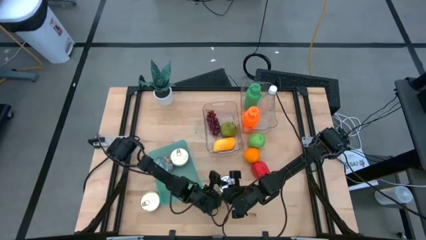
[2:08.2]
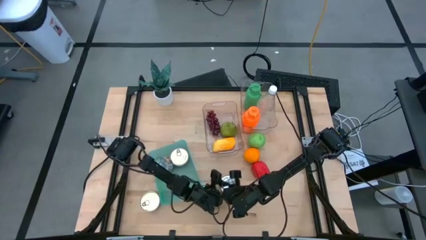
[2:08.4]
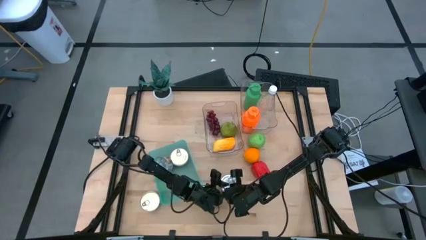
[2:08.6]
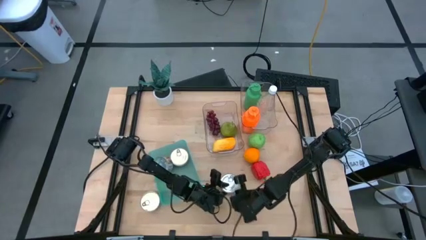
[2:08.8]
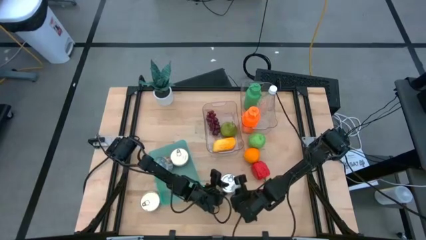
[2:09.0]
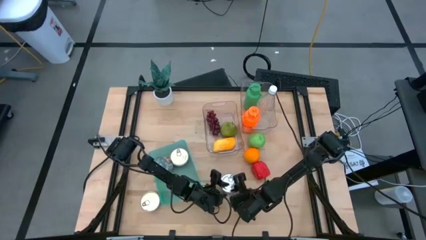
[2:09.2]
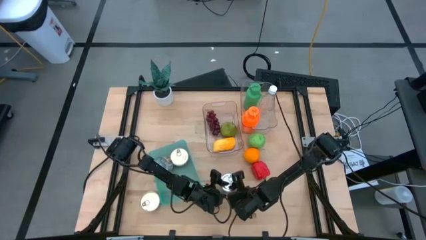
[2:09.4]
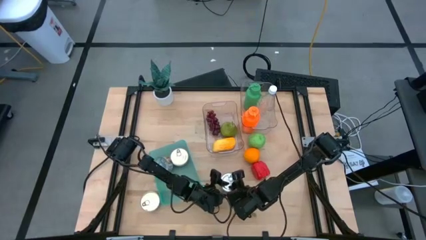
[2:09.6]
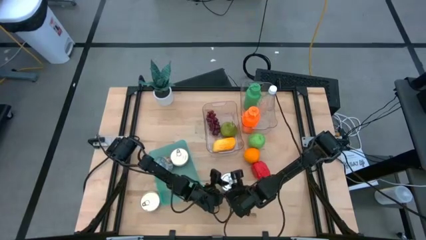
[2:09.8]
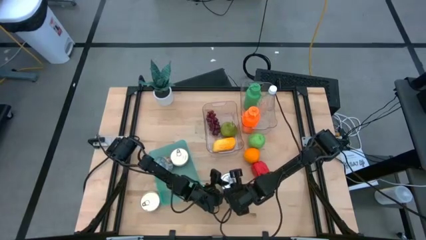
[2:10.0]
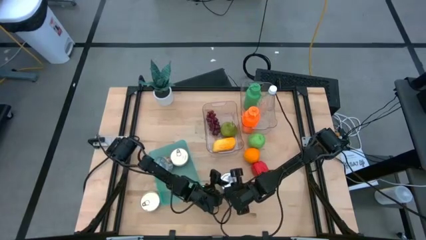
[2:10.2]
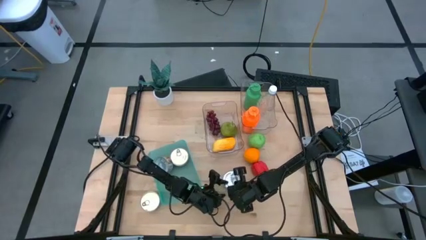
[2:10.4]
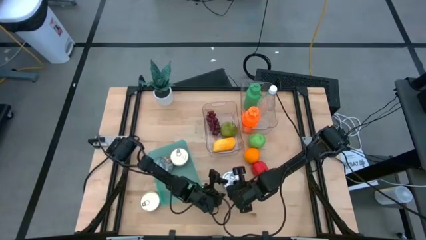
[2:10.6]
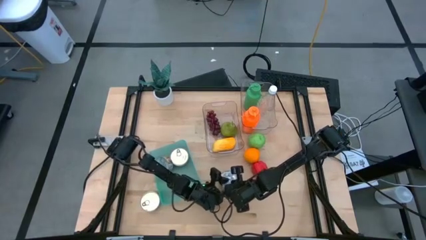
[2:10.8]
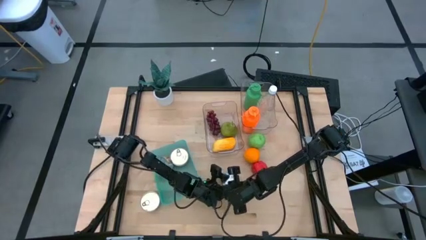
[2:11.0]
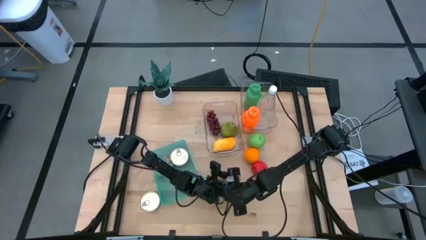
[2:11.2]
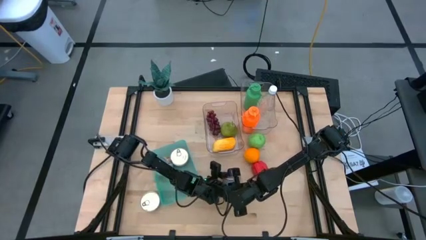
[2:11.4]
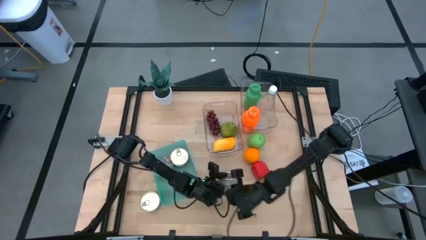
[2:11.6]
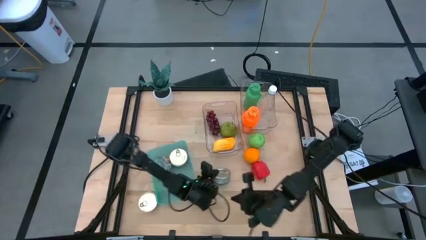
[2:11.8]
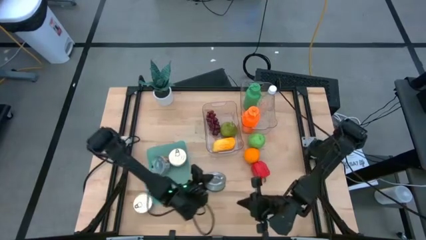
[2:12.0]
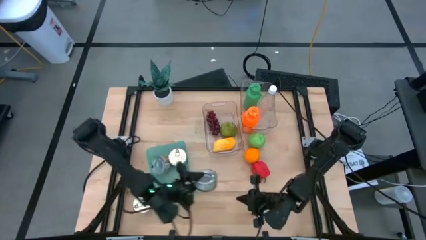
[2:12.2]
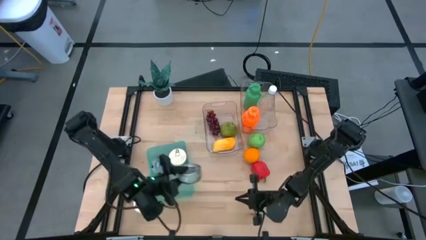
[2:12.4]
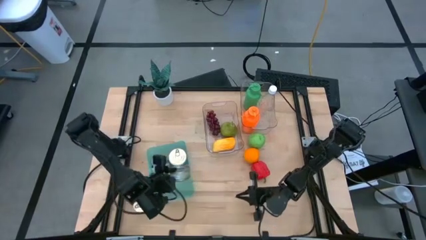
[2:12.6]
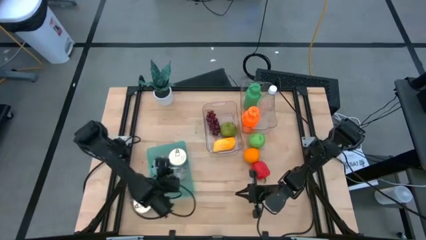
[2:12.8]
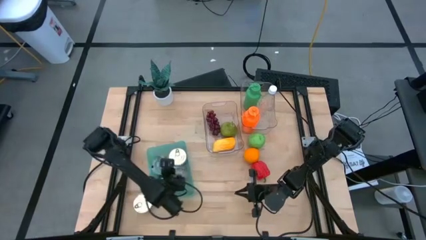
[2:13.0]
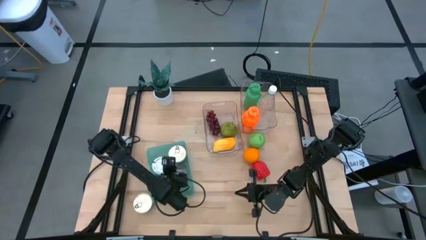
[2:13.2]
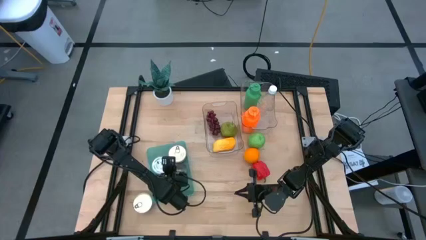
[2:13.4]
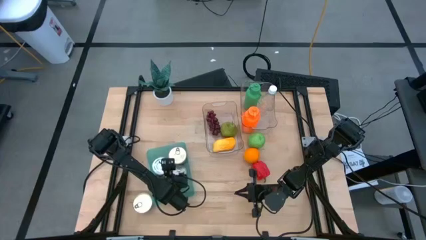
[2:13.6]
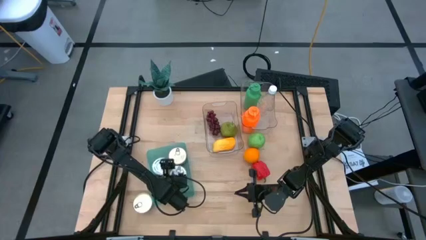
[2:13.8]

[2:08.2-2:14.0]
Task: Pick & Place Food Item
Put the green tuna can into the green bin

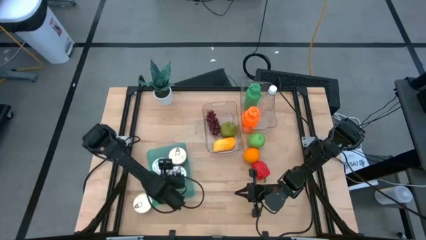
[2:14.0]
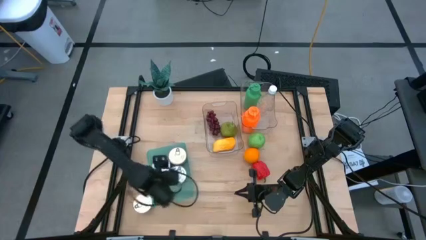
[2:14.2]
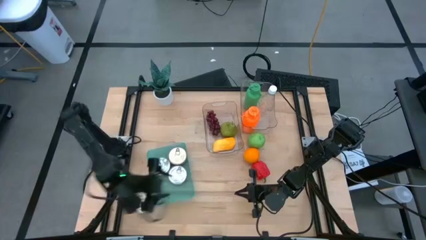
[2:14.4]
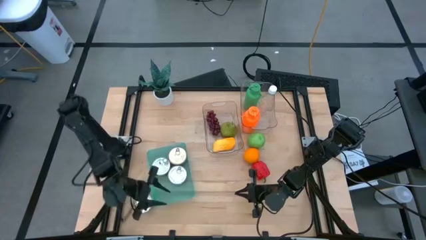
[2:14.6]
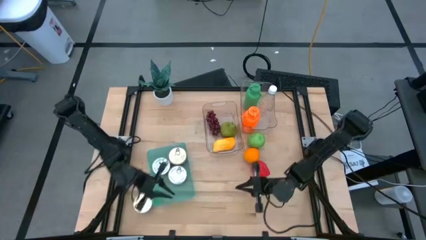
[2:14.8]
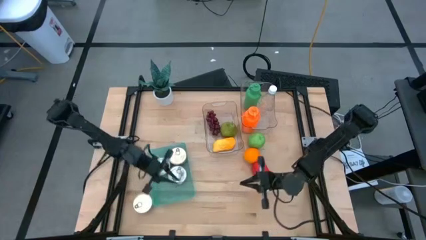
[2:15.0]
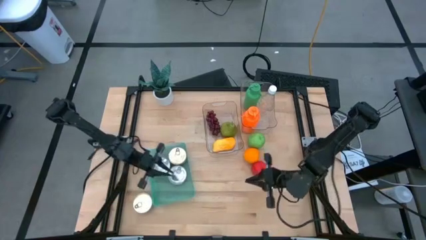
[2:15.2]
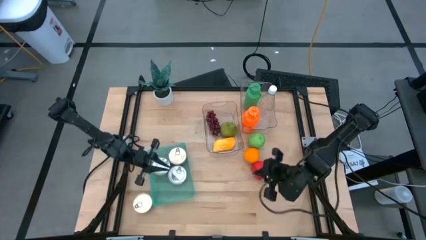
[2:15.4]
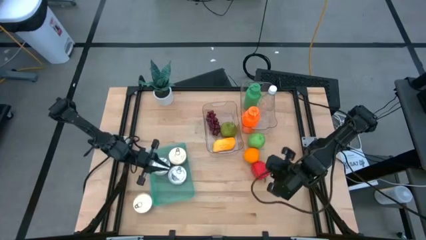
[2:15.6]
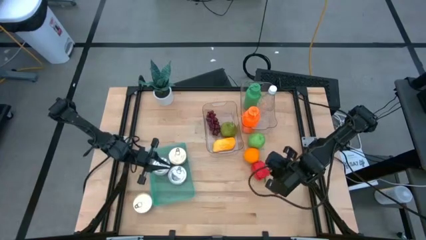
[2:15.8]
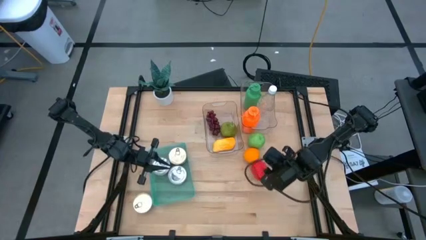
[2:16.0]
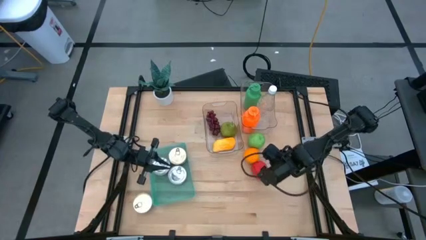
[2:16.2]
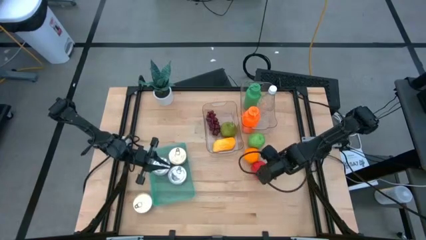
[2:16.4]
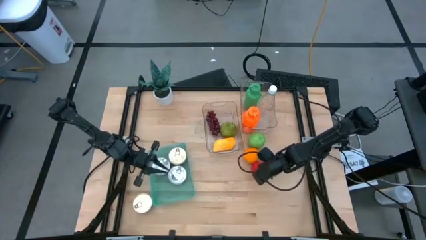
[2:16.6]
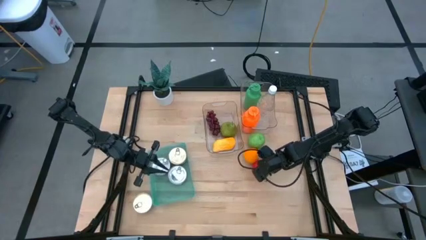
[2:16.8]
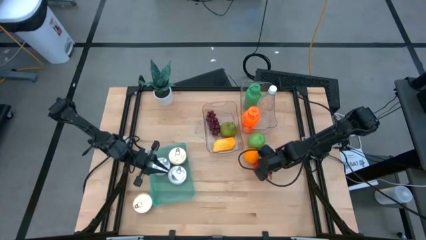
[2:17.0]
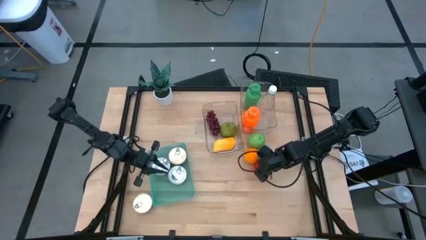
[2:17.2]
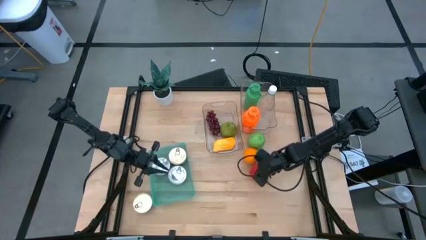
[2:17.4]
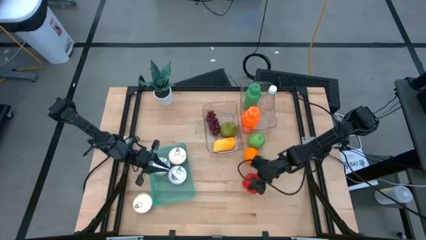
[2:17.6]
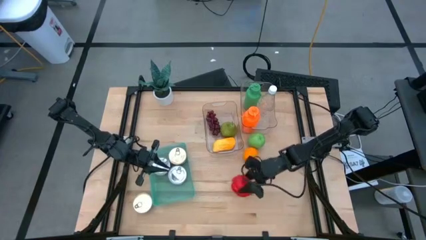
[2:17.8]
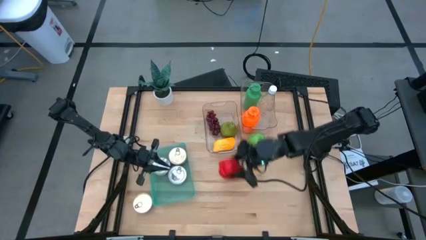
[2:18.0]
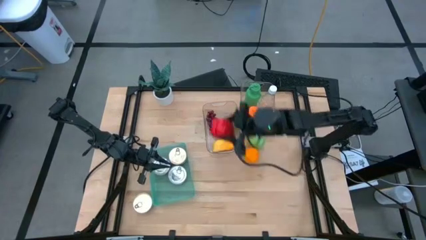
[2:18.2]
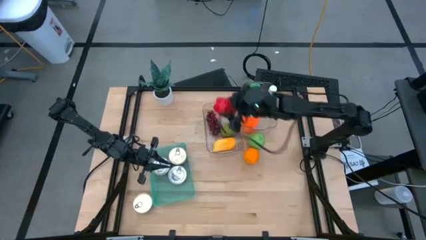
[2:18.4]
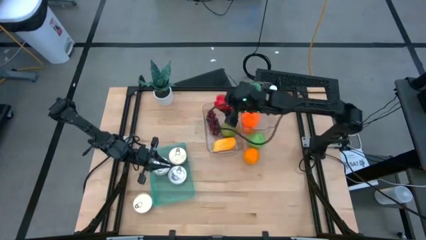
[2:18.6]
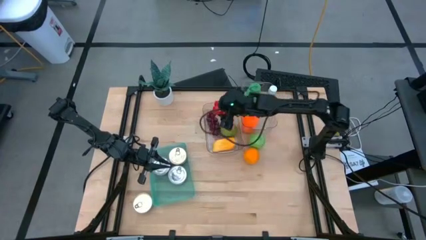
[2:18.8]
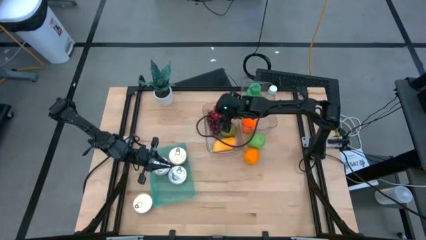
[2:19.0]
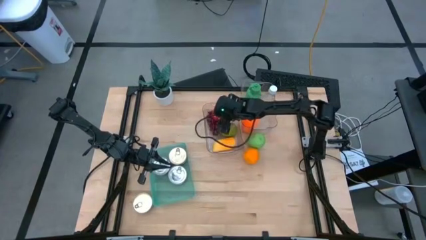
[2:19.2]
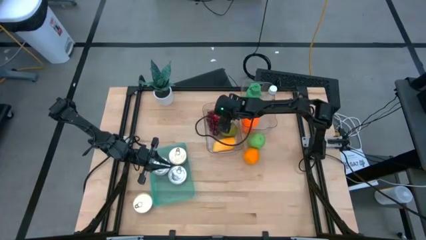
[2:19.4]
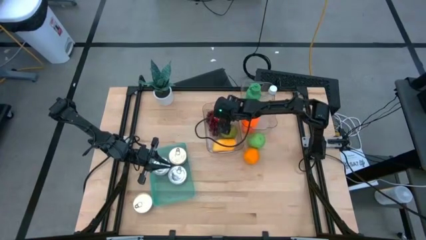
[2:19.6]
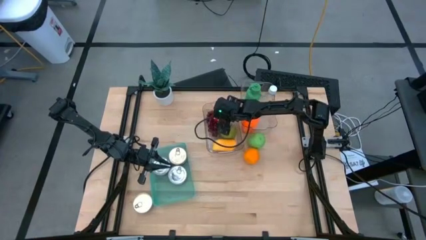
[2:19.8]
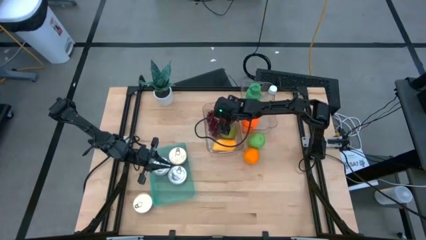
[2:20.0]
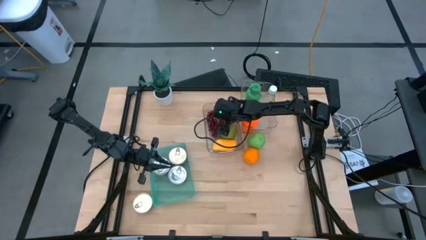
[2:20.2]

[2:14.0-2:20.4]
Put the red bell pepper into the bottom transparent bin

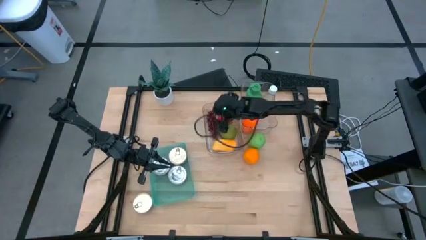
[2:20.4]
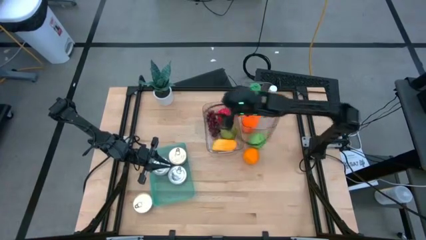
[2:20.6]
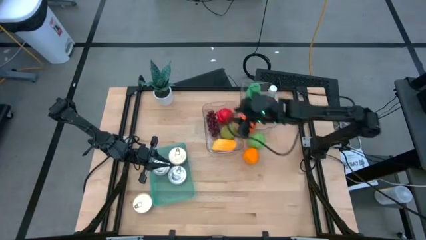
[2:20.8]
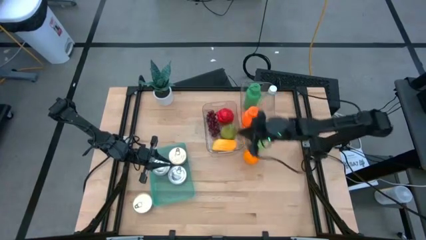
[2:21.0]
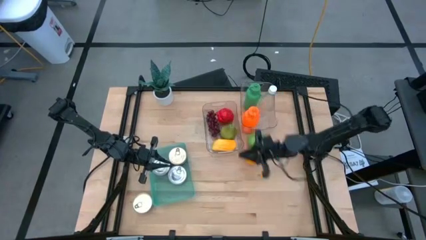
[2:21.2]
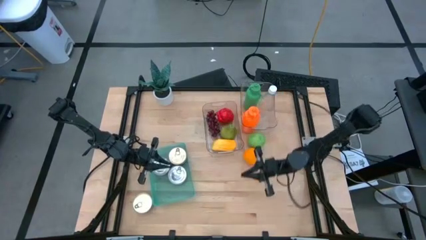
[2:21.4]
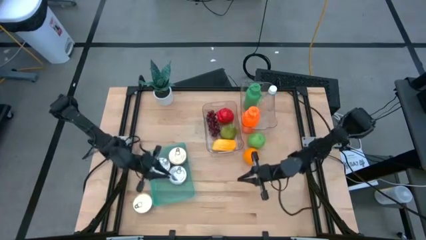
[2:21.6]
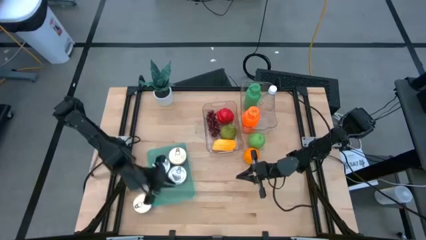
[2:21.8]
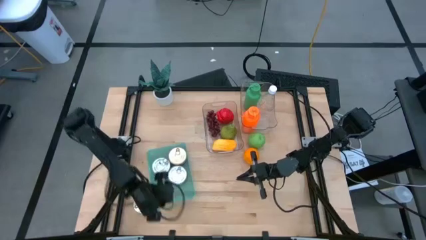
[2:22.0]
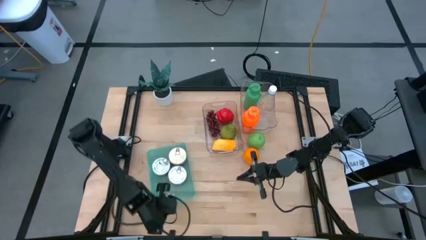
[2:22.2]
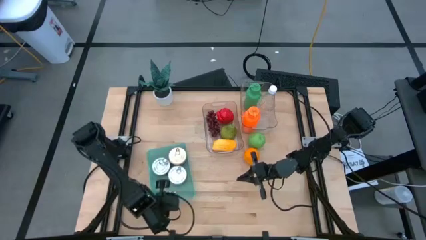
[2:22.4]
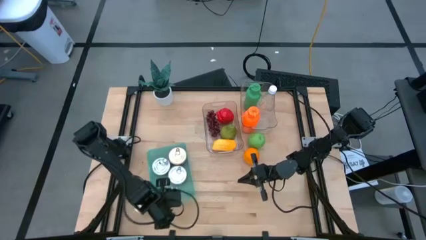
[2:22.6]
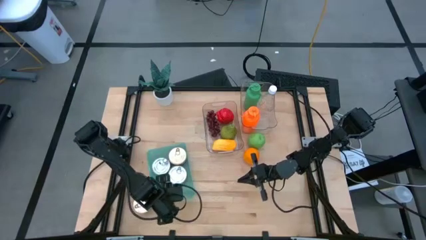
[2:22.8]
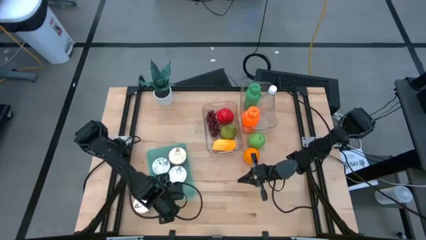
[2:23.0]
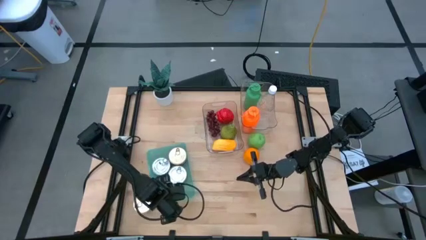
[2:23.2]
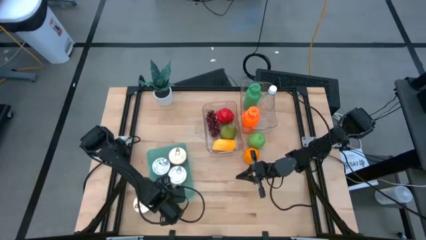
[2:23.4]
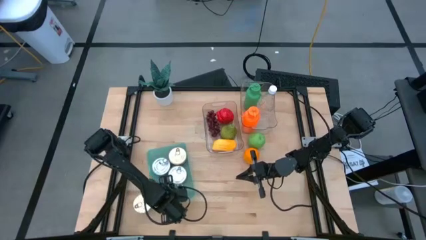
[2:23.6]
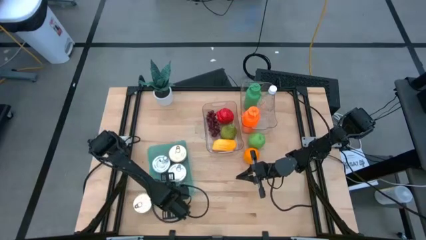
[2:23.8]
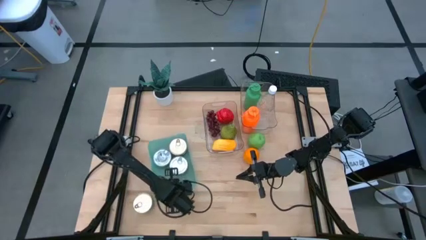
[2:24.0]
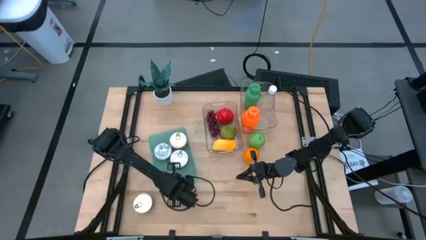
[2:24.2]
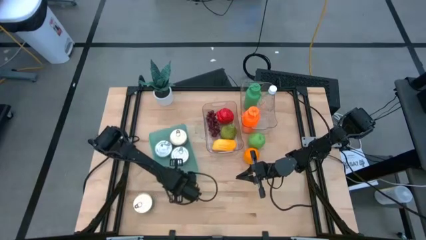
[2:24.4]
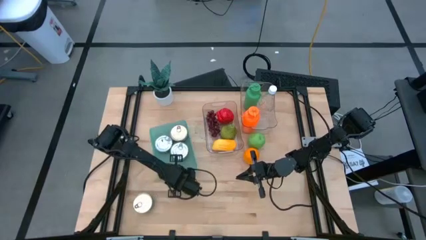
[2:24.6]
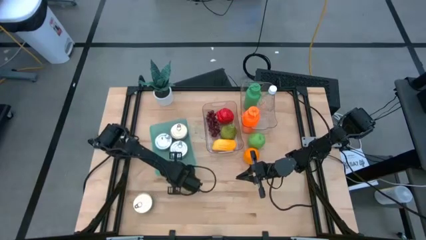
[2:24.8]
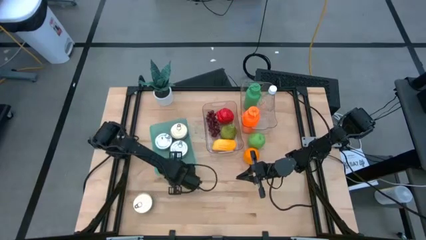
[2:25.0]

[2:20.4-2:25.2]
Adjust the green bin on the table
